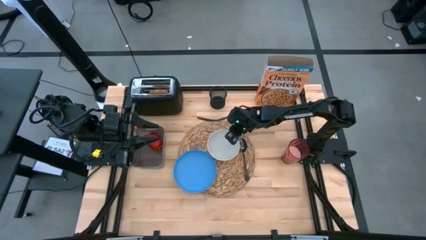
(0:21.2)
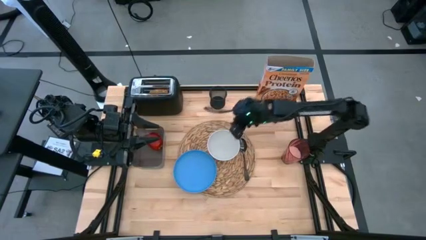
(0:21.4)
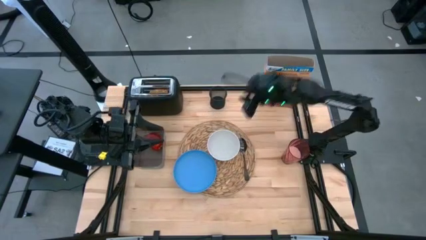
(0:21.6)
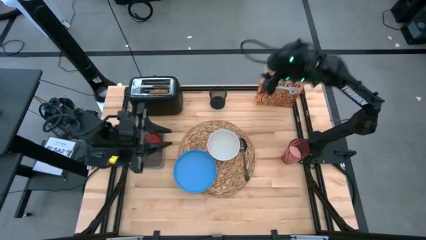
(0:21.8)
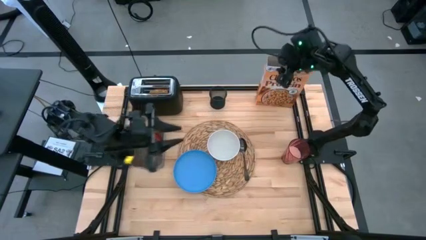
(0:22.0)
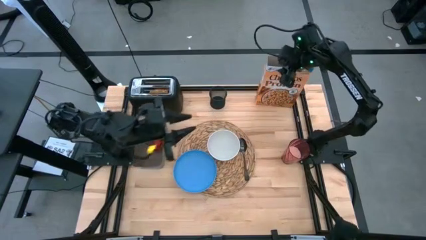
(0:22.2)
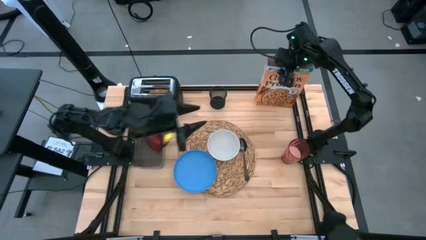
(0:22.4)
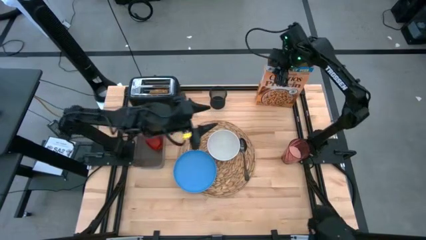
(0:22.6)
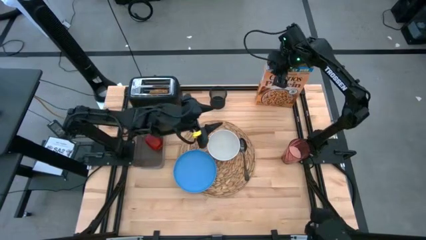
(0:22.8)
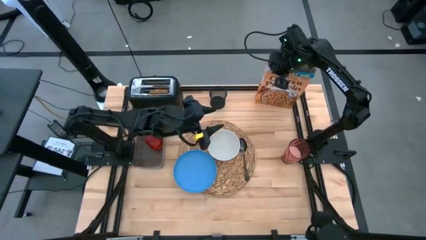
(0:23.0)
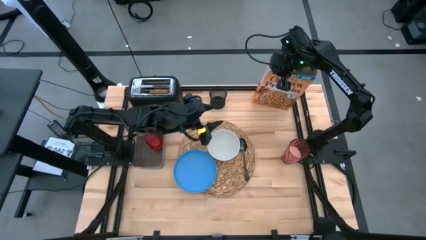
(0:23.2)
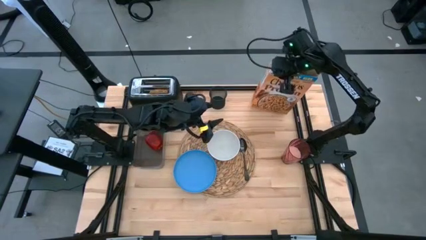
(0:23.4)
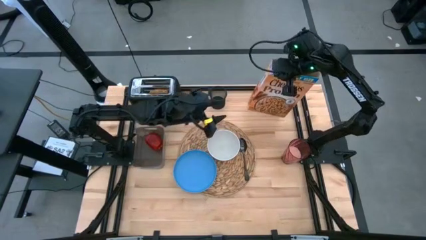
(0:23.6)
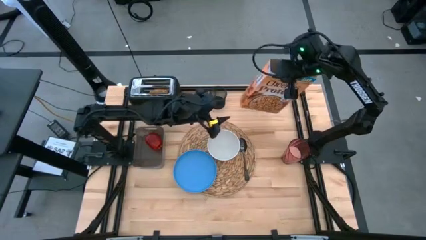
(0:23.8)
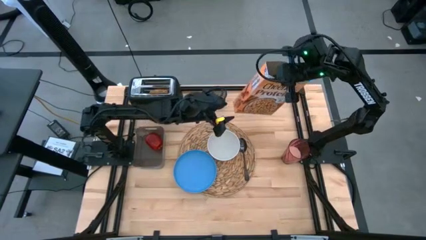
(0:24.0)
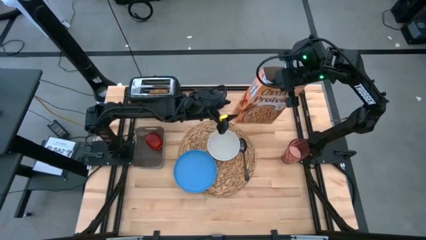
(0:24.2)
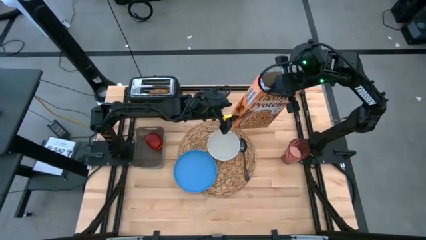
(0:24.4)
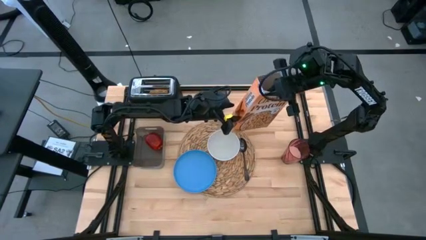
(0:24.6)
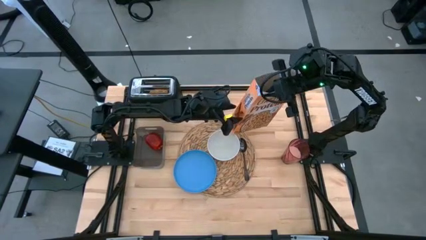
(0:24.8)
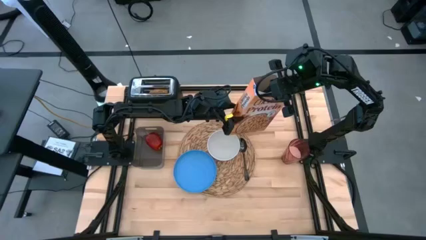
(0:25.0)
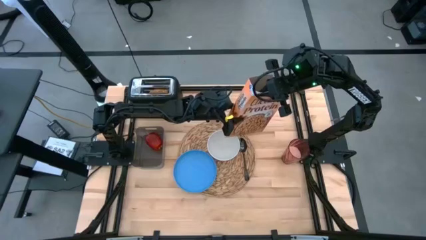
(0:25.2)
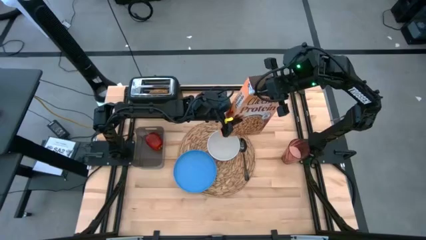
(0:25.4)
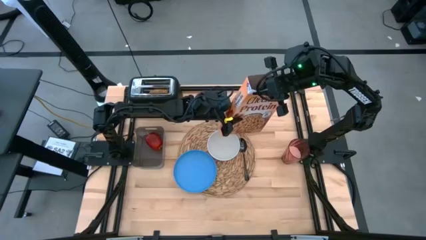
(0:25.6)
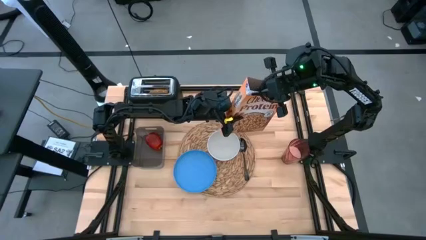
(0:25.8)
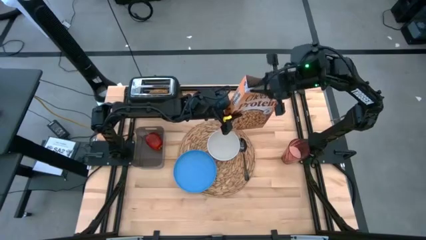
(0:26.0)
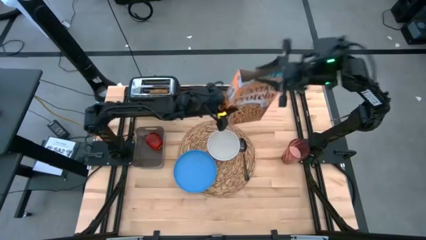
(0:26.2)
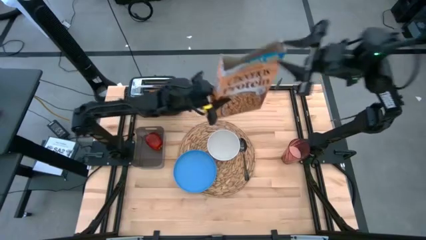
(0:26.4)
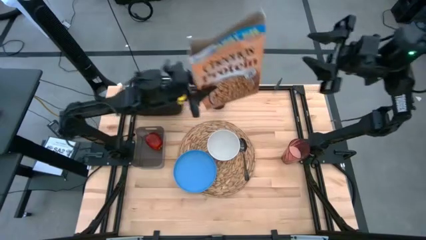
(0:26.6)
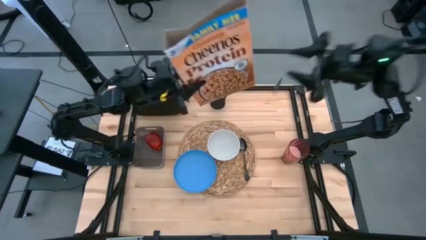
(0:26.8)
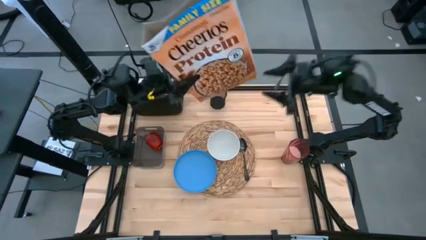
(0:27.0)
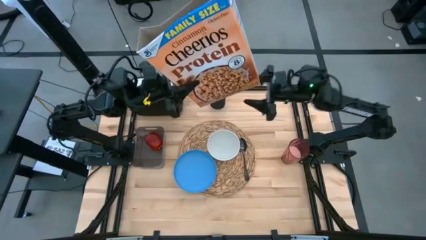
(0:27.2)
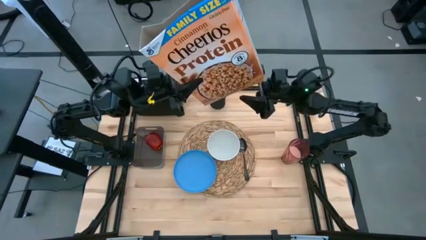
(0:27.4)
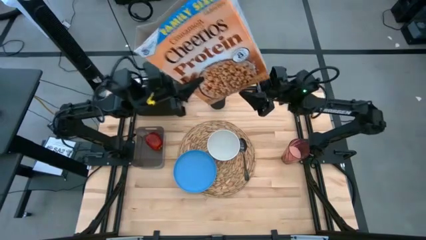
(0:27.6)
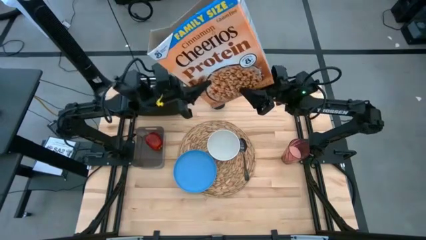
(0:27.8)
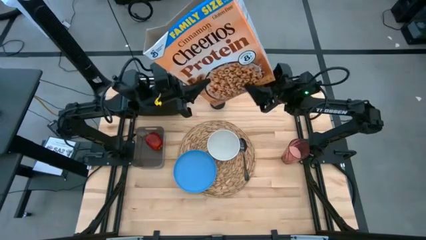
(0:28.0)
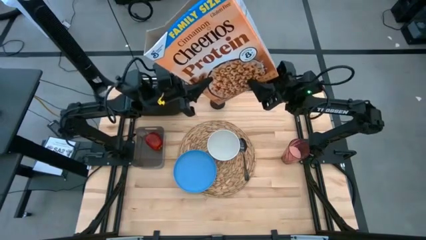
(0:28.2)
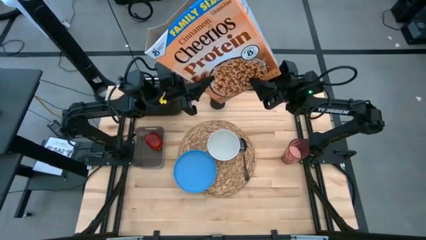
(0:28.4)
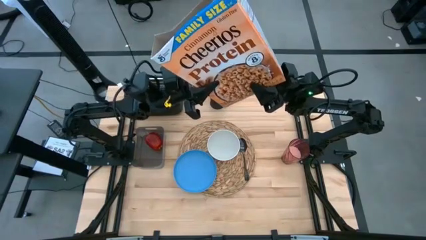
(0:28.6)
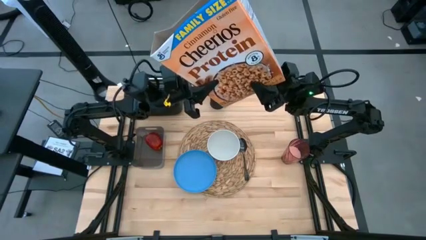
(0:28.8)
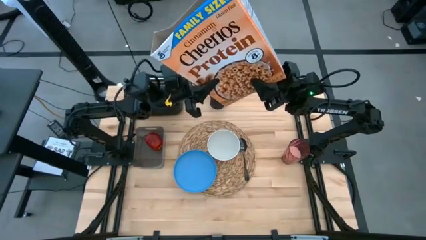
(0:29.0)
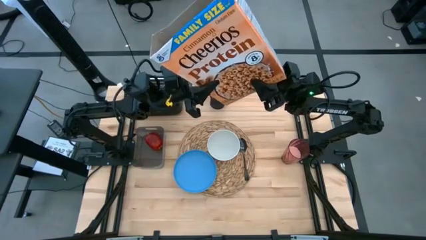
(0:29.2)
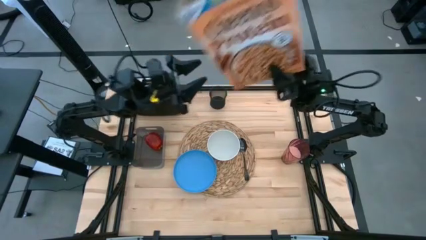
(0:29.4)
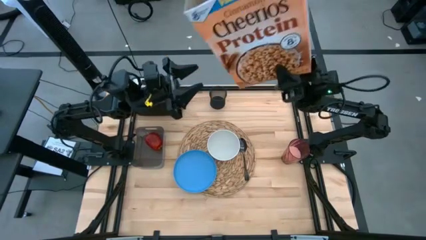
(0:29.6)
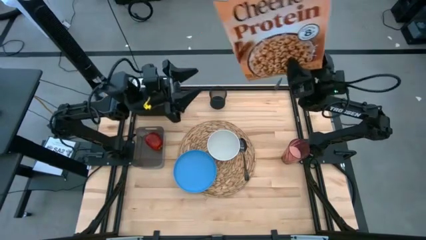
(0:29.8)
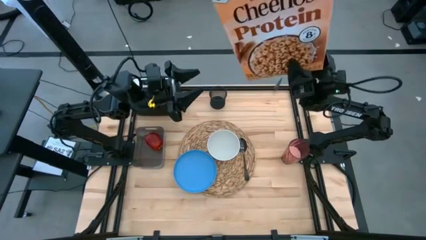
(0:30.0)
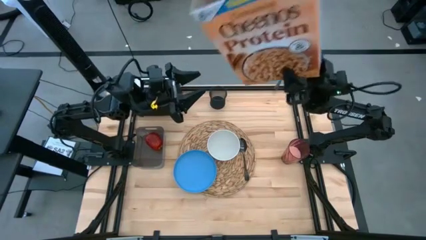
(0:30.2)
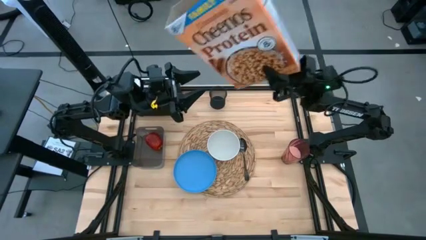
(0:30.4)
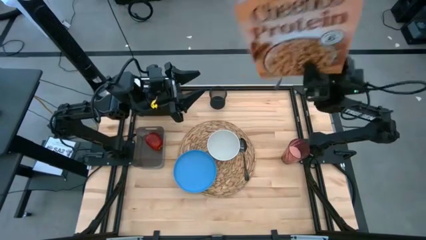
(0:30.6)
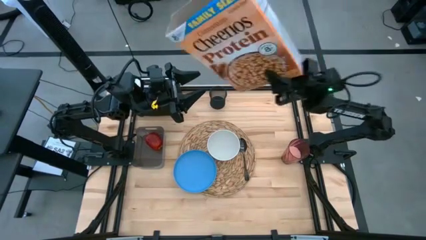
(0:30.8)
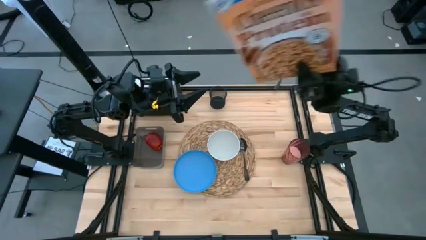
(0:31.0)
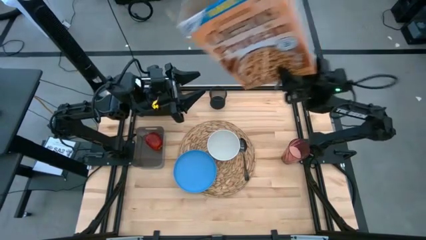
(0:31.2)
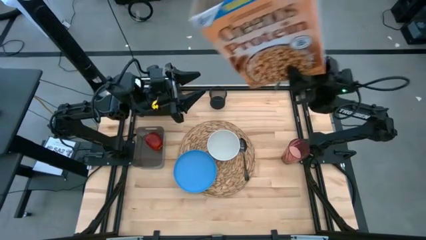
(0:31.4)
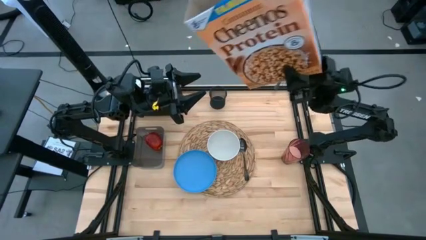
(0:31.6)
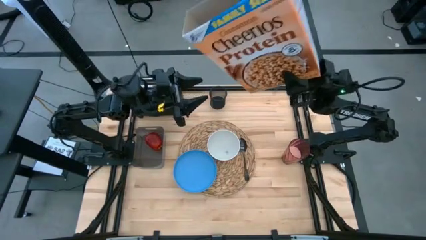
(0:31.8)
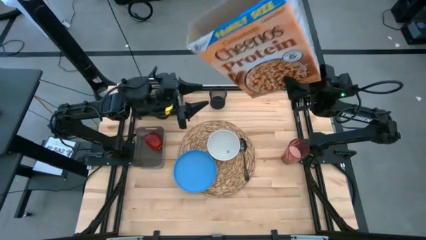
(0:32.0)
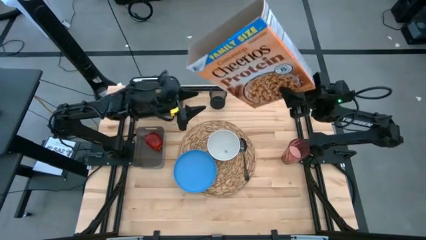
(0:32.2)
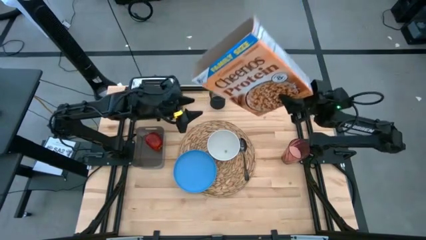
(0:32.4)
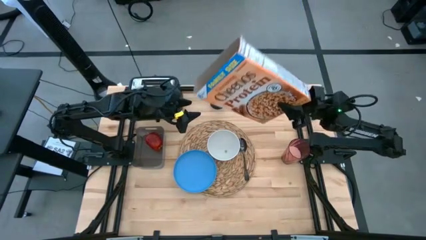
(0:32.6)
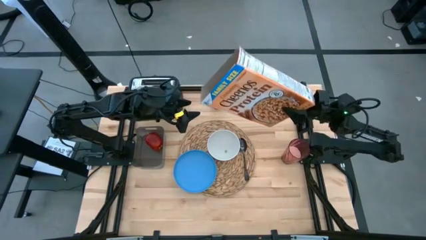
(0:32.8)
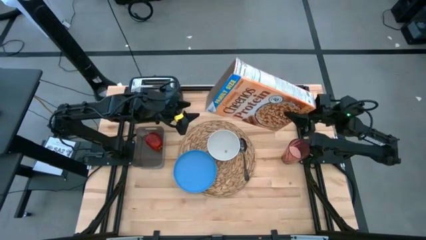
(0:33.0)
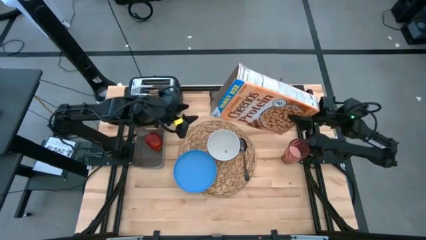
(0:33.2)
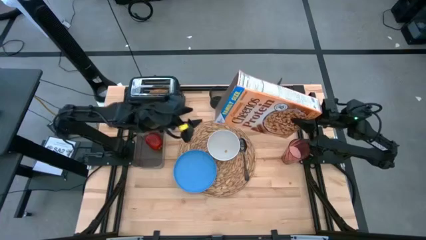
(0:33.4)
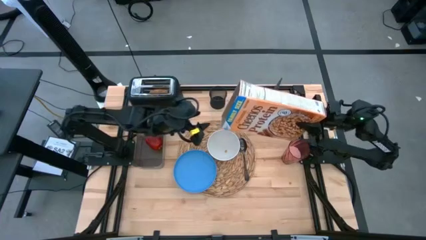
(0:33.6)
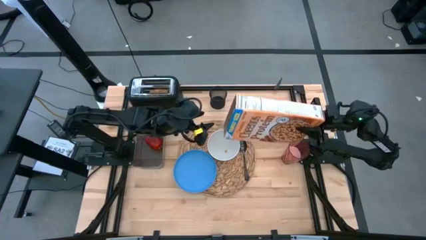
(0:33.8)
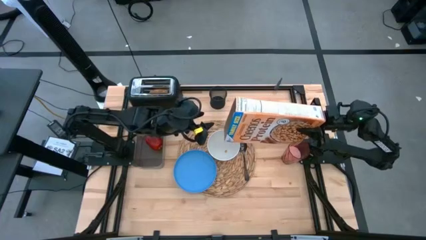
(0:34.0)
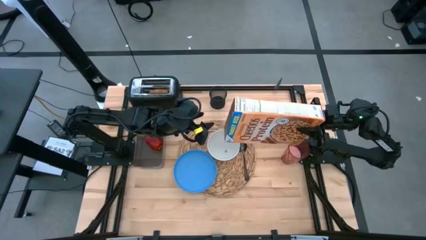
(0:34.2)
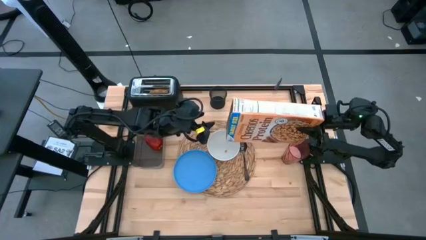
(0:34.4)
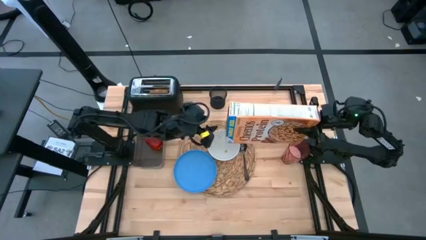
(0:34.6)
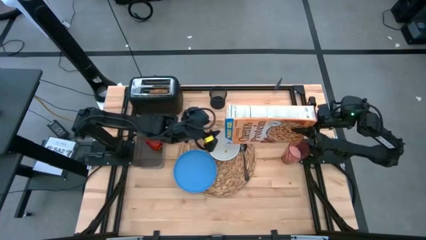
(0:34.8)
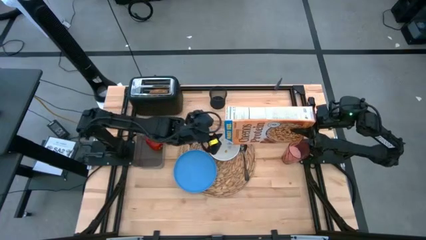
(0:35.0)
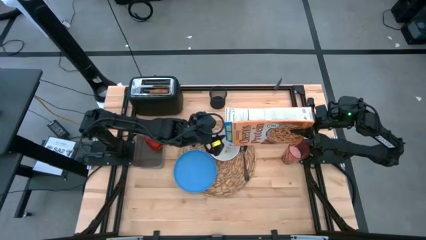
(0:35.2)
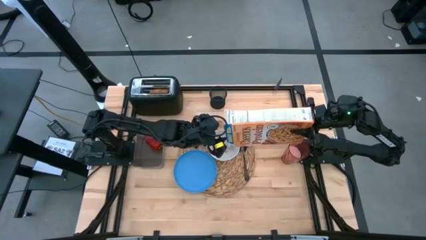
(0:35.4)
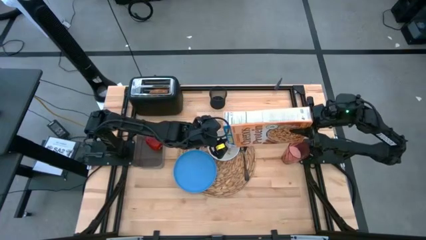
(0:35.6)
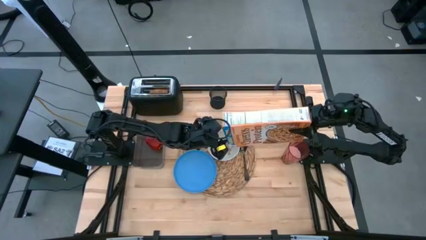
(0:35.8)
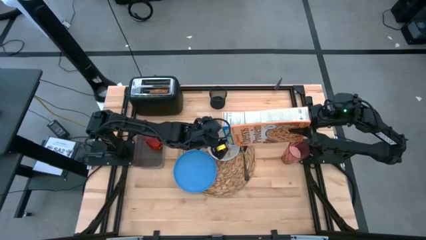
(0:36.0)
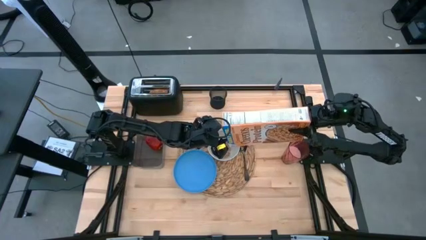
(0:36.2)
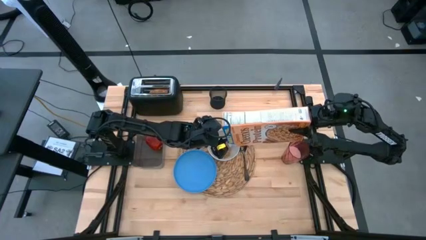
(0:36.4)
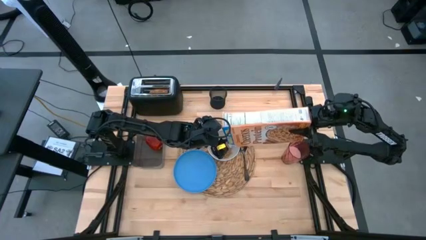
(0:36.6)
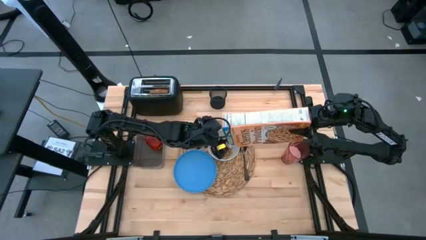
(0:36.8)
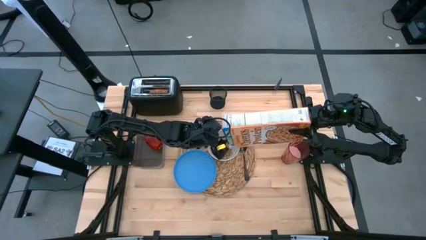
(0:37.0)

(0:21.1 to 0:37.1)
Task: Arrange a breakfast setting
Pour the cereal from the yellow cereal box into the white bowl
